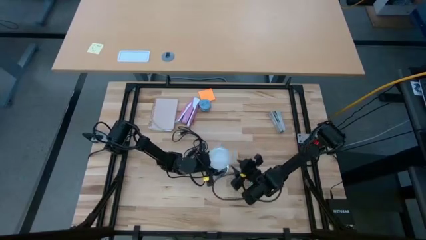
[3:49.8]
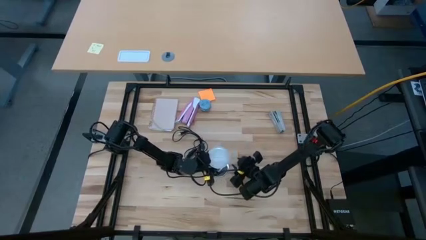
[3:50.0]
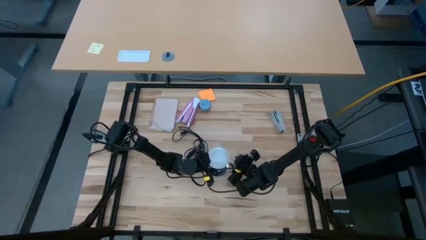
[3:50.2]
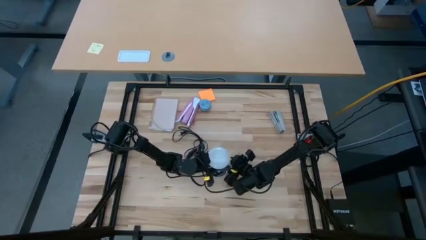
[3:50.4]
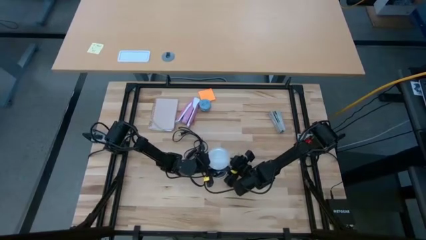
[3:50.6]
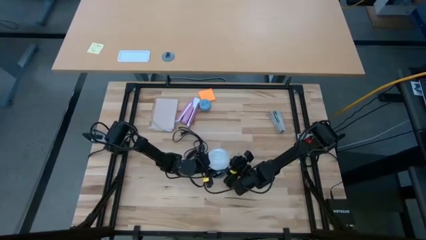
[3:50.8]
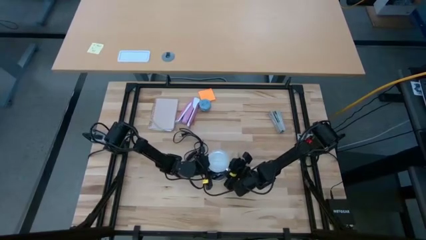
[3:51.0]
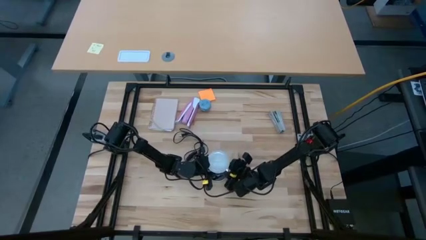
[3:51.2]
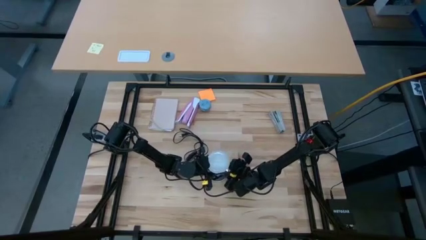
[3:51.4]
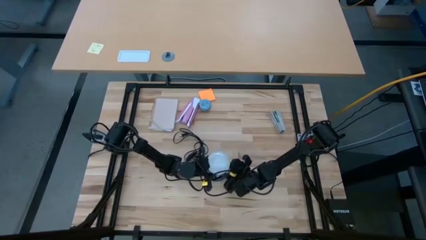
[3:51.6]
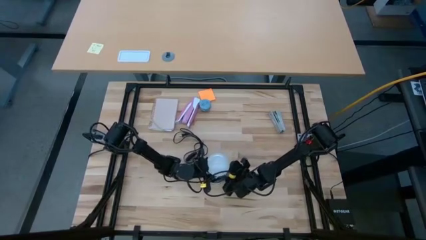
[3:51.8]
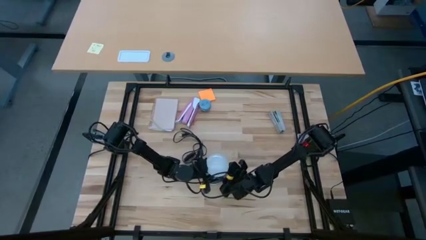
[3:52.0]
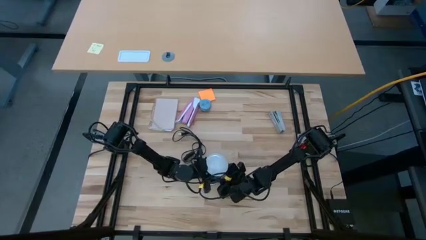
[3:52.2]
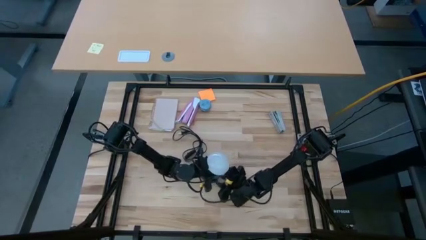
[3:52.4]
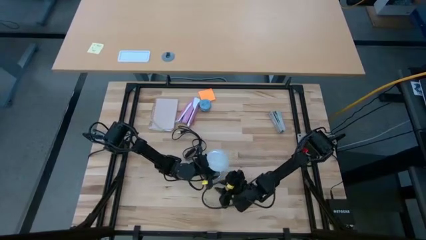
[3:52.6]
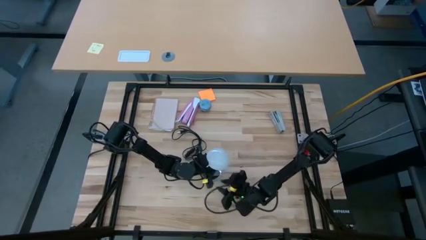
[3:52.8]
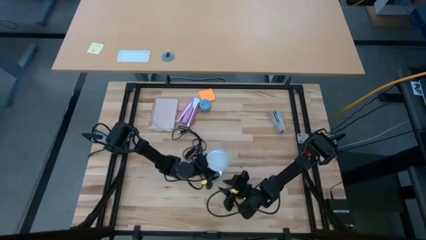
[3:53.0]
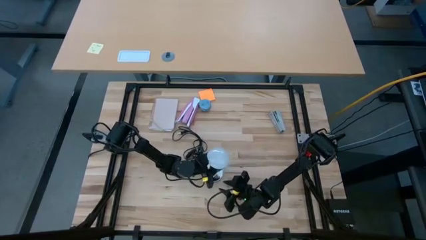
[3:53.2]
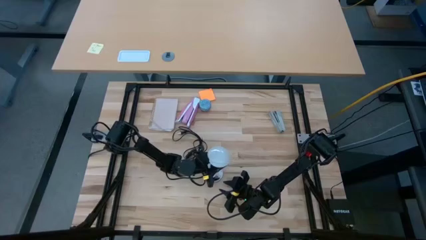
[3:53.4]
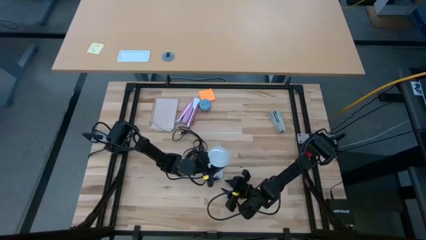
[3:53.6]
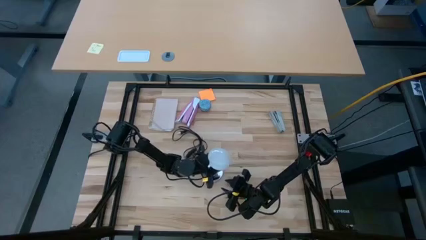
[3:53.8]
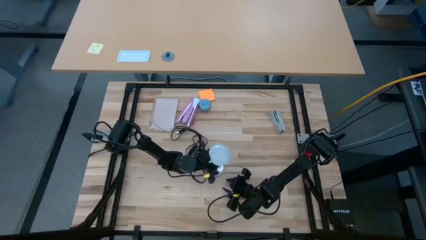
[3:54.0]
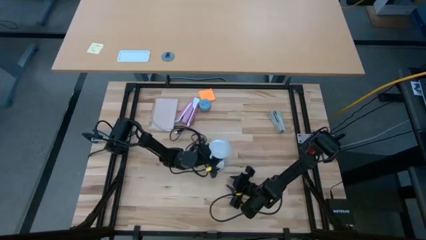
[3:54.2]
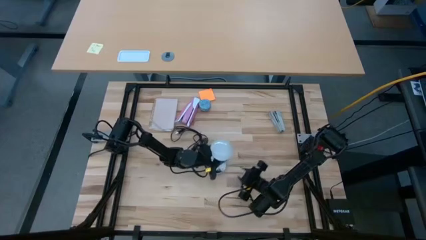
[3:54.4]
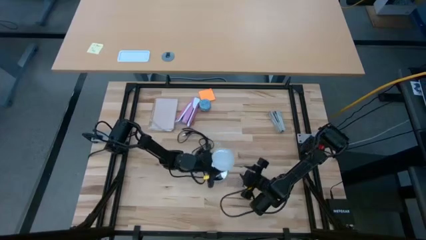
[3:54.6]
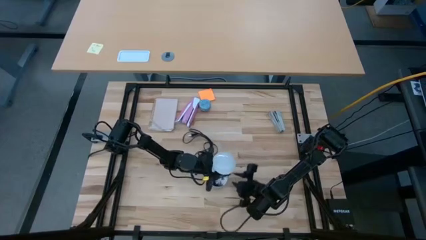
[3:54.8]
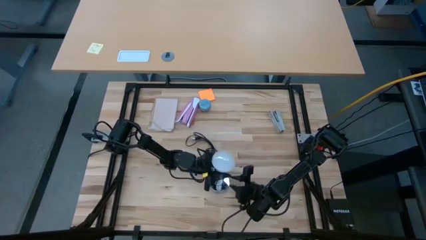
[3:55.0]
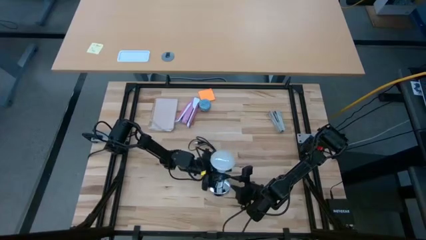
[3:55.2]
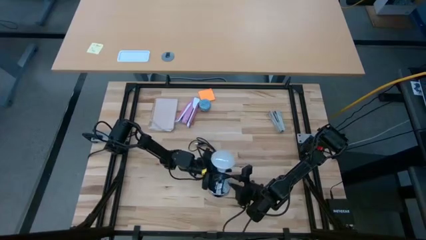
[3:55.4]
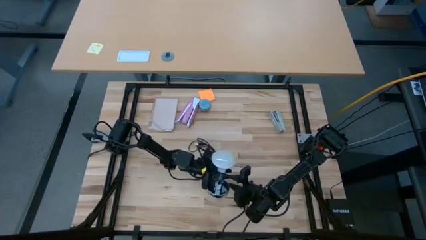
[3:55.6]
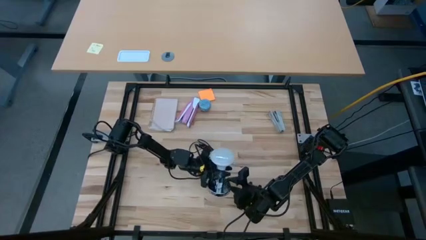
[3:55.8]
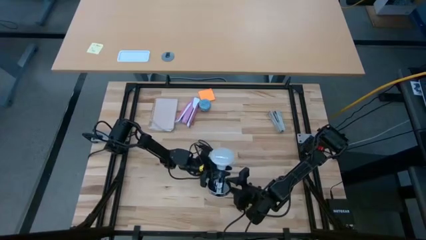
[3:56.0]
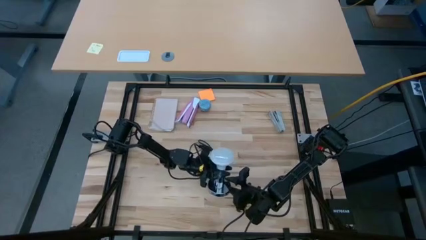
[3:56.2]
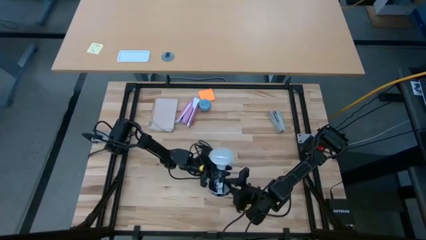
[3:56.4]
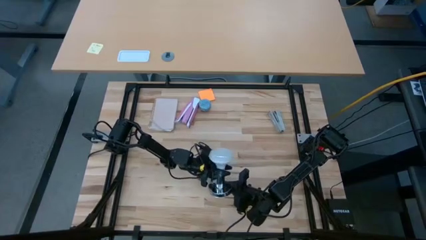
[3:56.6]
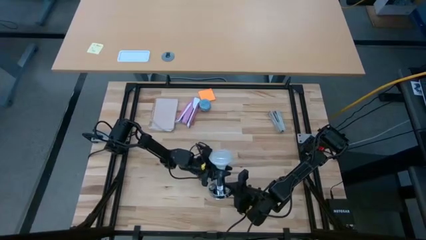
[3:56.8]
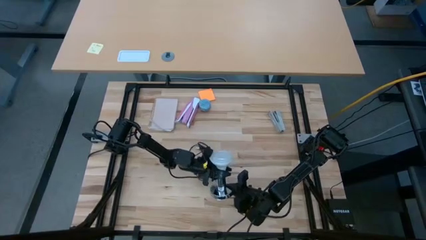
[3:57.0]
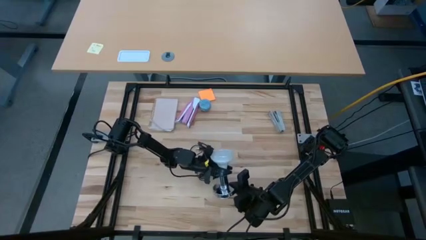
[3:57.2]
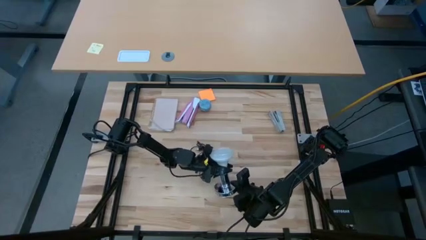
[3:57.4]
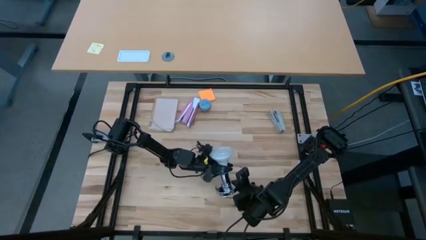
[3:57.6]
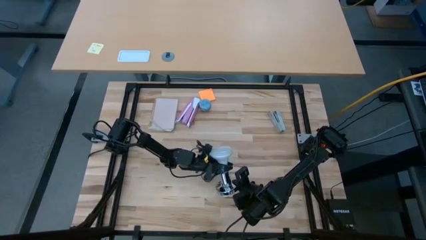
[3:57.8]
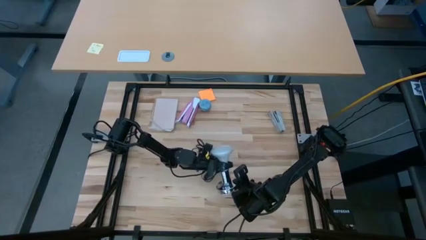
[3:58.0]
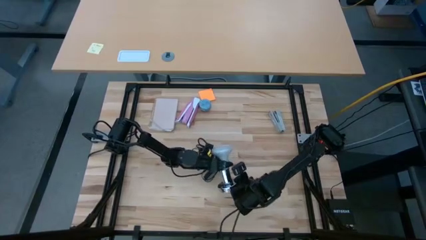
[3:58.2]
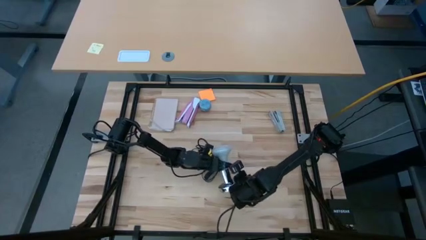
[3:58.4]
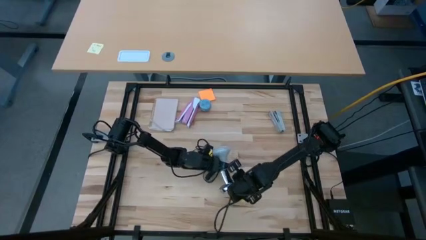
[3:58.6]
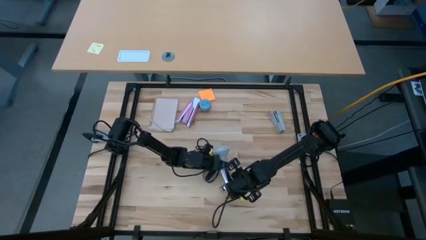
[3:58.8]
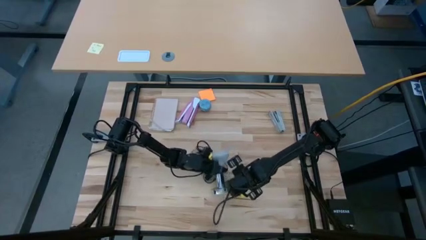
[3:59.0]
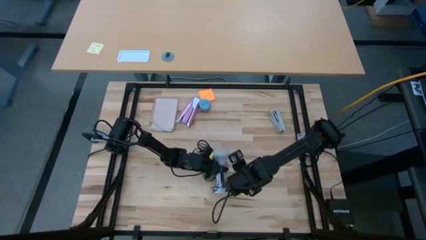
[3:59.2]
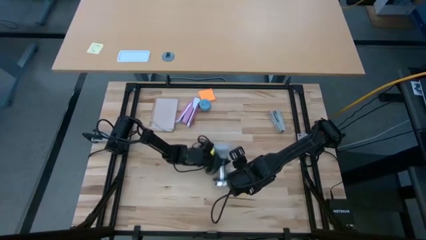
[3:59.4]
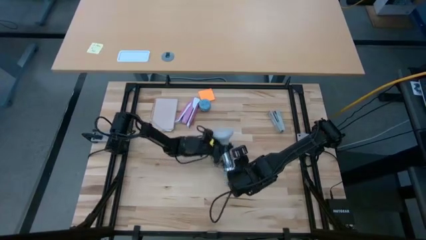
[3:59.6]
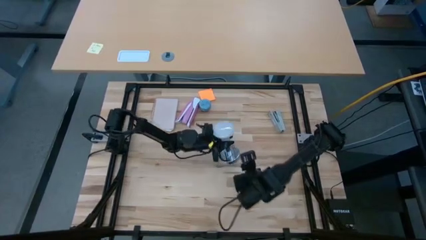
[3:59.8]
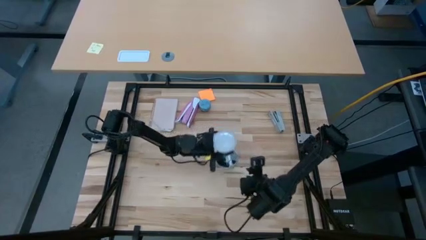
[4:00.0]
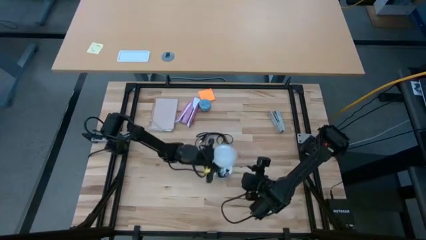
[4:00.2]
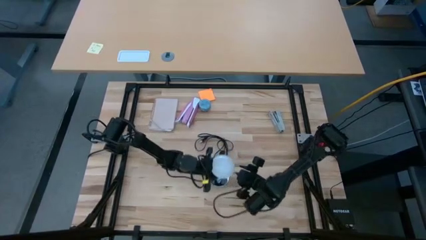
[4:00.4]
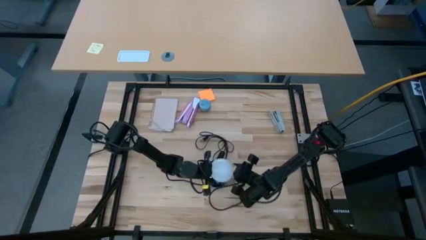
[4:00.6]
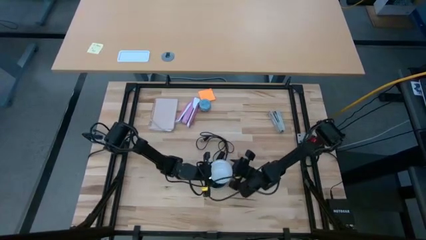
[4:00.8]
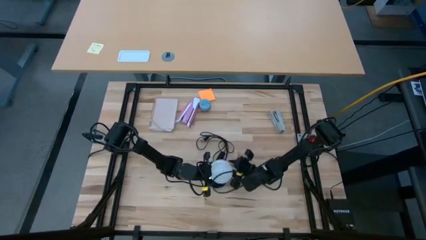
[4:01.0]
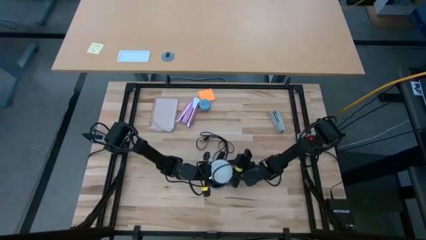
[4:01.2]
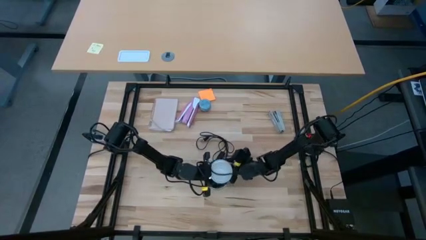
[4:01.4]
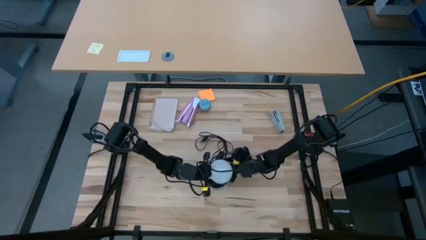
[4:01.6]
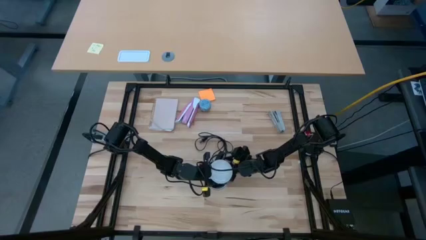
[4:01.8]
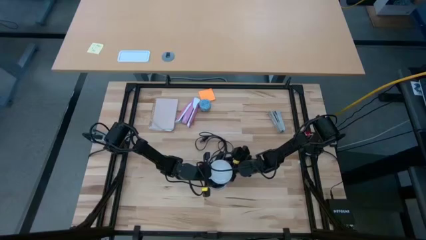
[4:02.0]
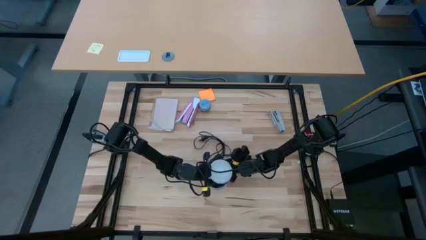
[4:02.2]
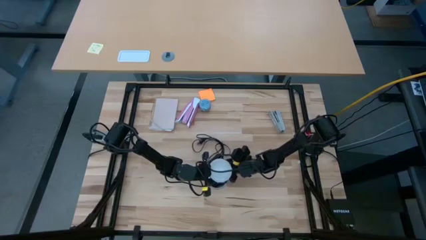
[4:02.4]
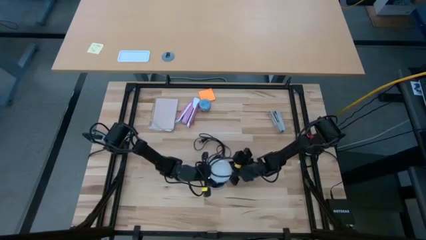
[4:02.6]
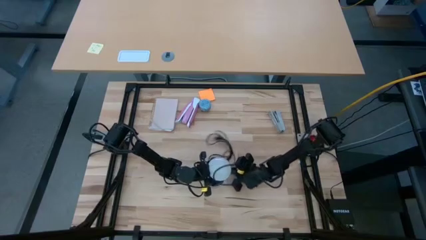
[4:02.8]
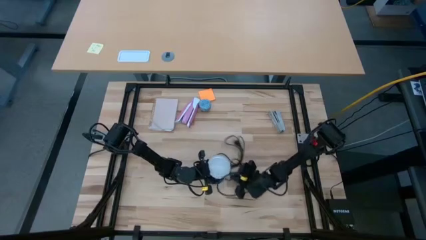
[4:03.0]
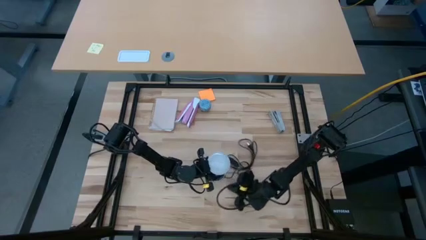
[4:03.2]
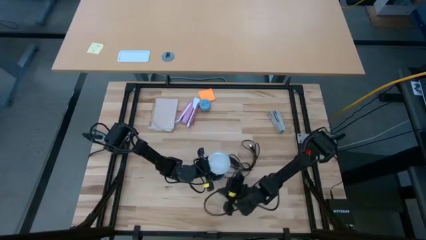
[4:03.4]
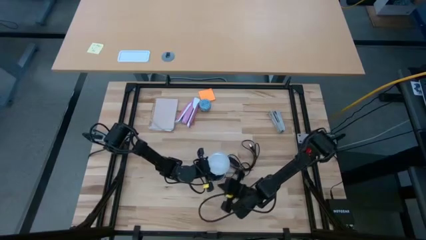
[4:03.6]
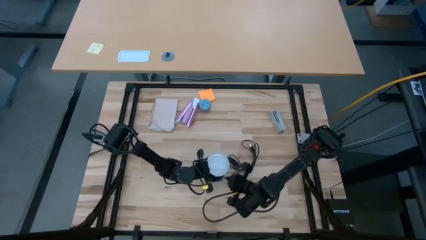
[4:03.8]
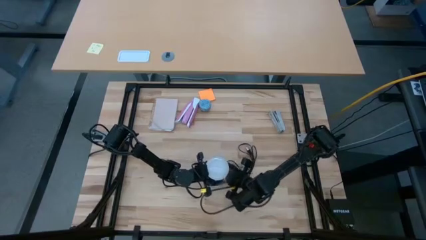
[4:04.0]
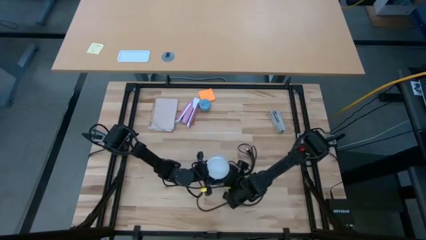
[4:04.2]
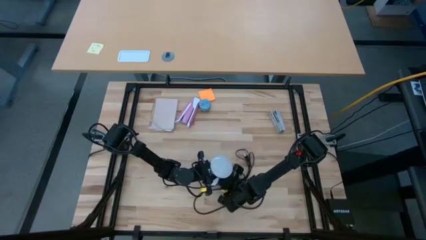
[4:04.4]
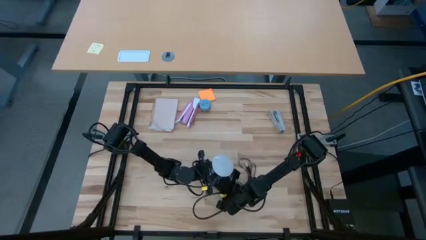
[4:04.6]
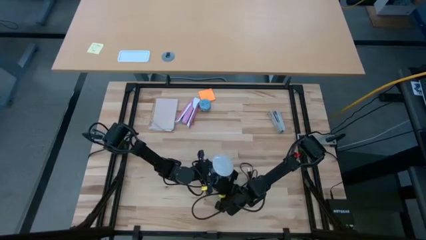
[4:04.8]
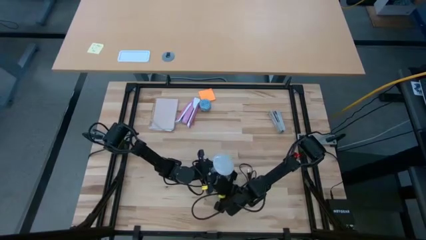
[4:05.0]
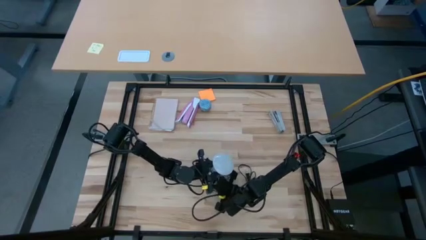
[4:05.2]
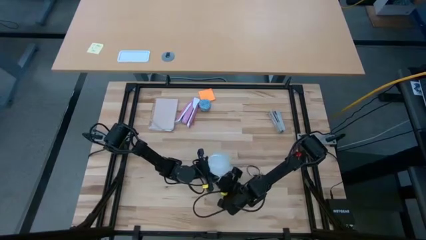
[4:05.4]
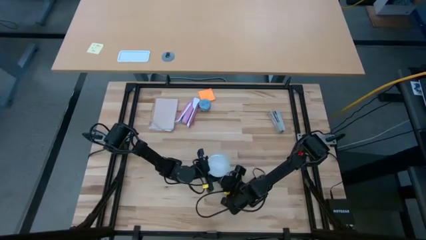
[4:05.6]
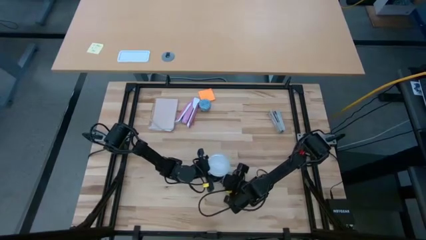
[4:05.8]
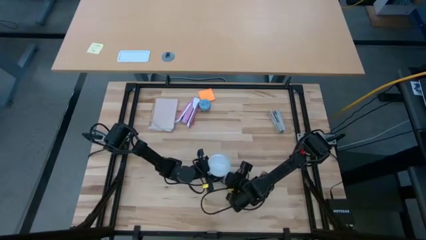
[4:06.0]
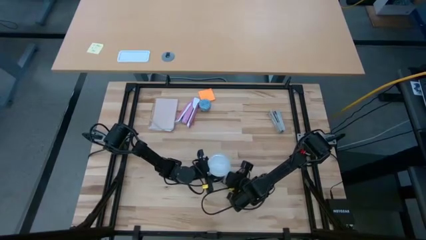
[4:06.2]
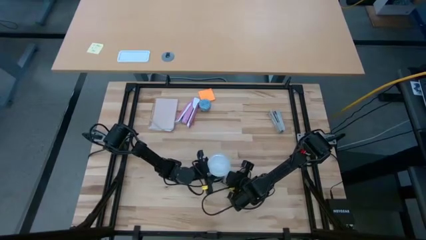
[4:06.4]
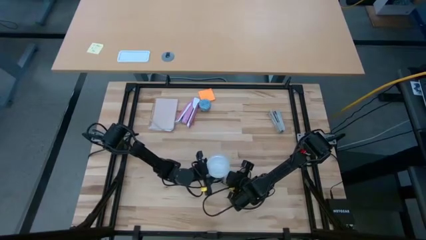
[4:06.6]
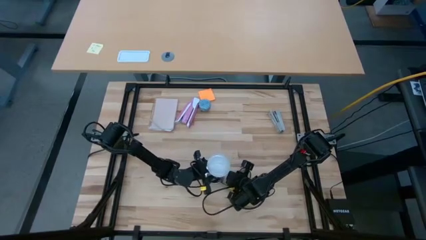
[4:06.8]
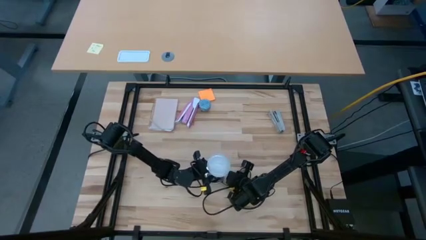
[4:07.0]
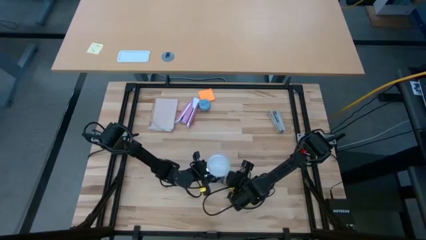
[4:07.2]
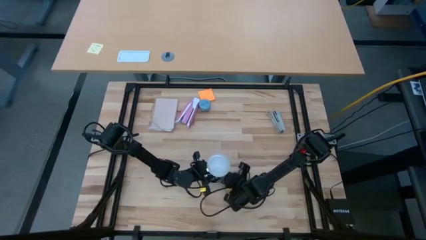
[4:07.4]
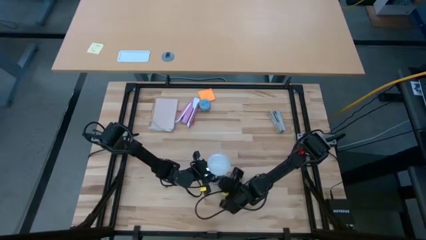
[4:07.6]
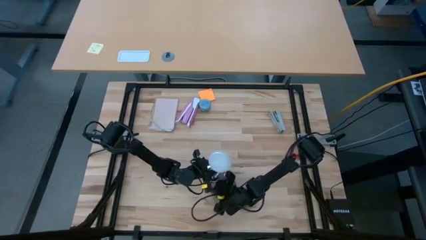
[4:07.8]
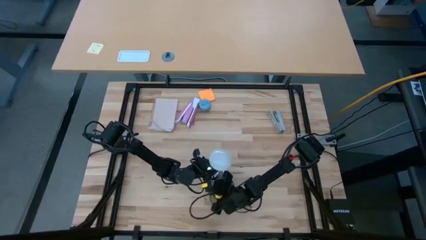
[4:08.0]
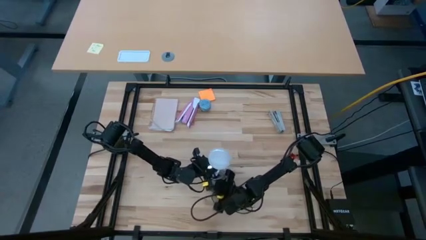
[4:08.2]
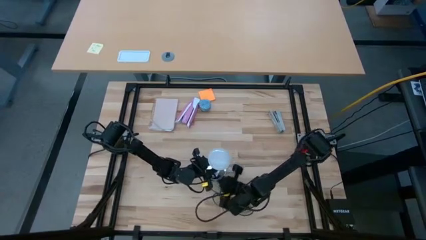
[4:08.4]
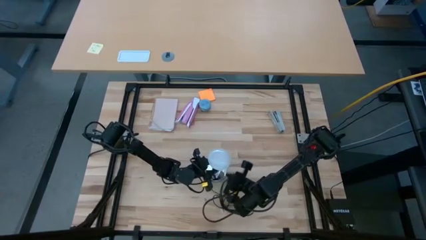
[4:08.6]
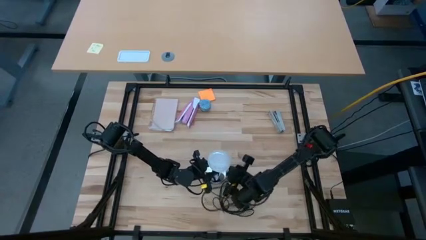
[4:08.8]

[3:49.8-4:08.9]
Task: Screw lightbulb
Remove the lightbulb from the lamp
